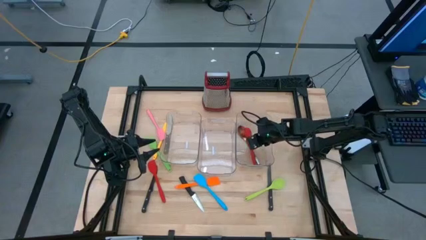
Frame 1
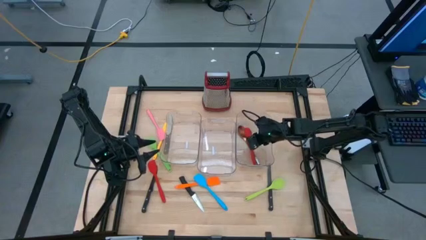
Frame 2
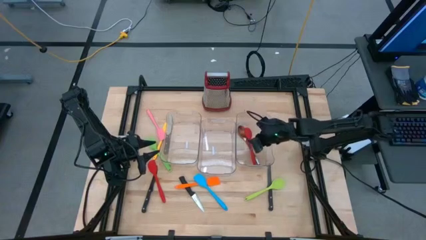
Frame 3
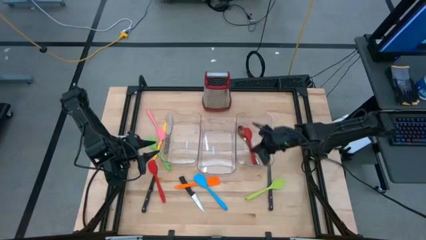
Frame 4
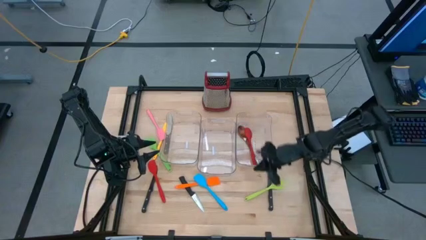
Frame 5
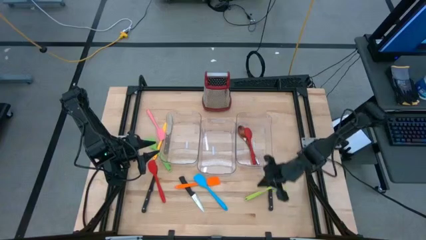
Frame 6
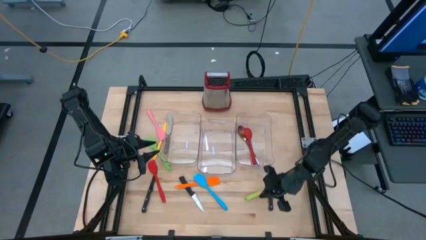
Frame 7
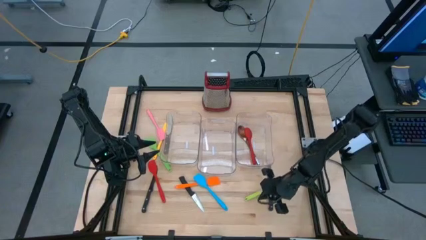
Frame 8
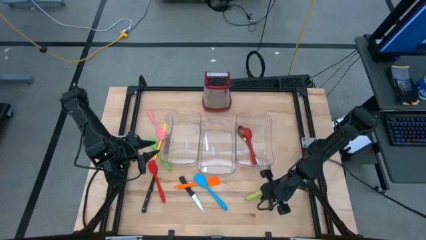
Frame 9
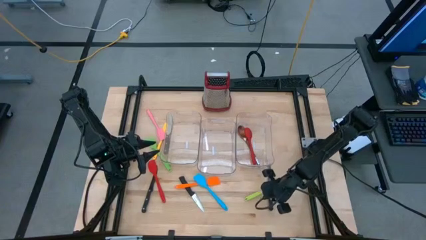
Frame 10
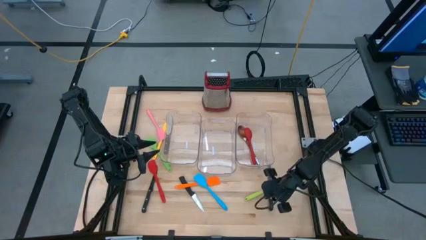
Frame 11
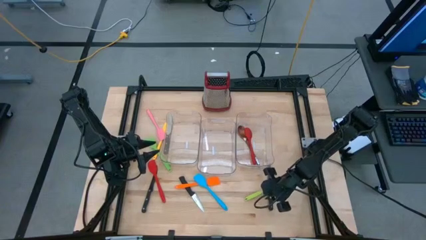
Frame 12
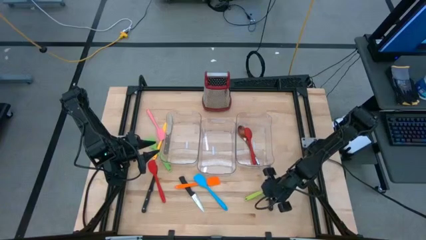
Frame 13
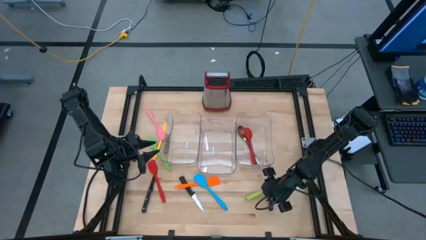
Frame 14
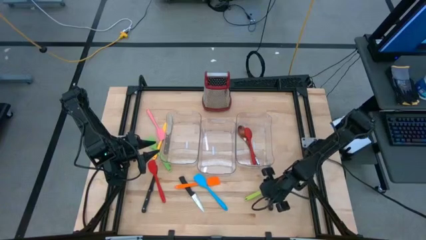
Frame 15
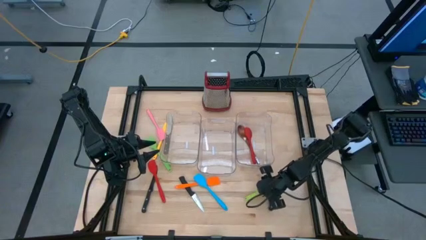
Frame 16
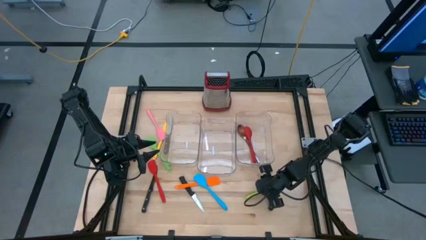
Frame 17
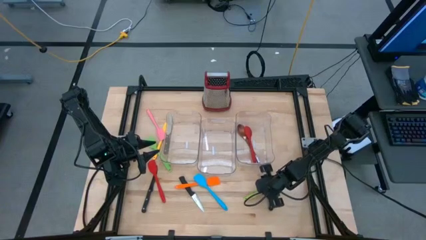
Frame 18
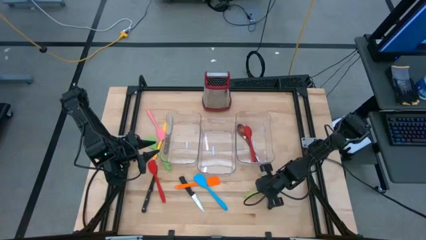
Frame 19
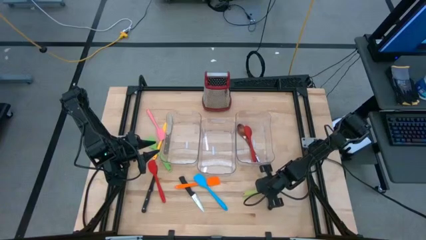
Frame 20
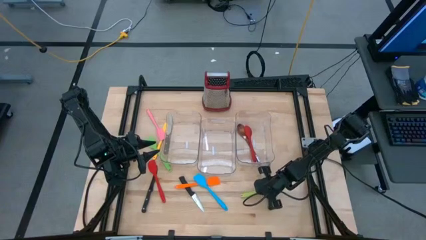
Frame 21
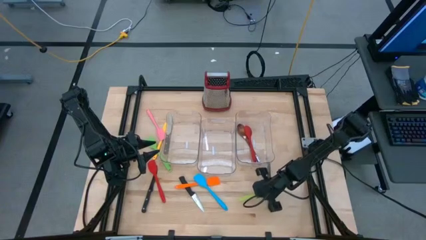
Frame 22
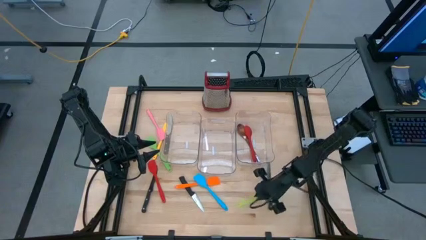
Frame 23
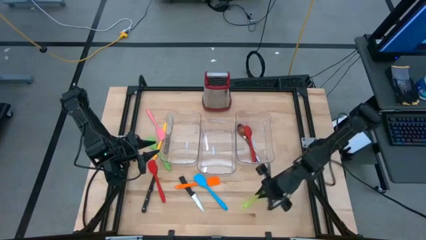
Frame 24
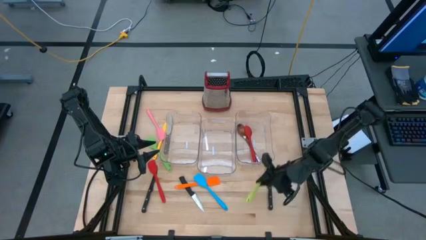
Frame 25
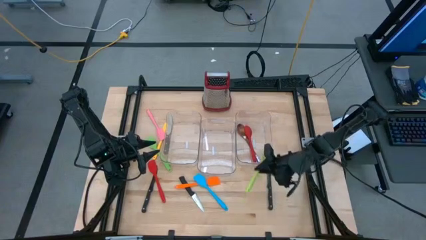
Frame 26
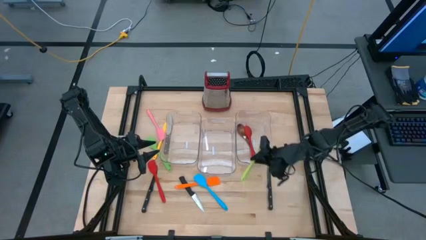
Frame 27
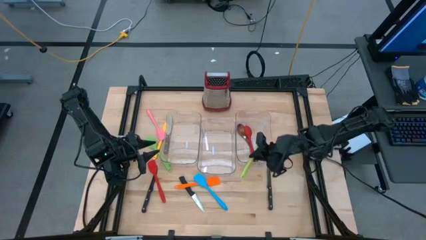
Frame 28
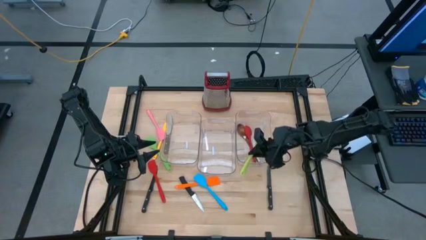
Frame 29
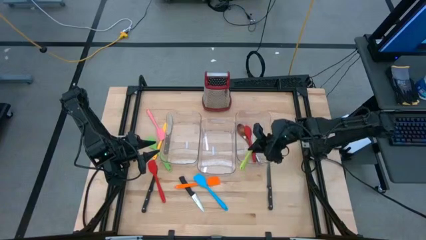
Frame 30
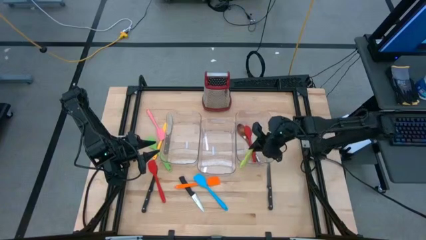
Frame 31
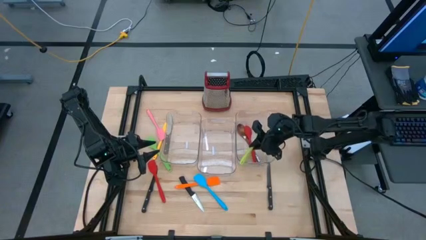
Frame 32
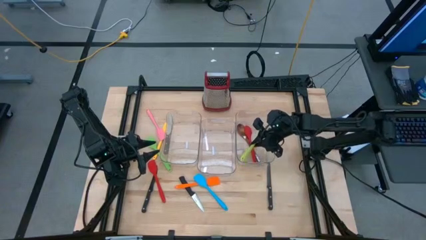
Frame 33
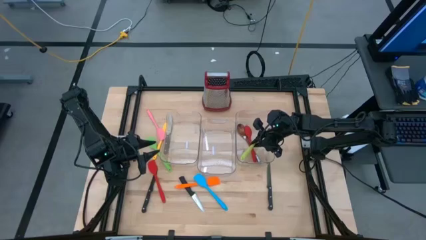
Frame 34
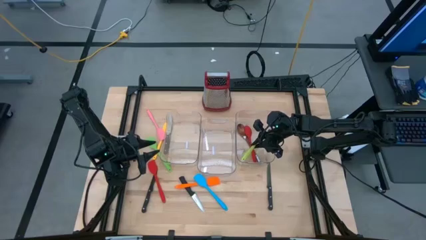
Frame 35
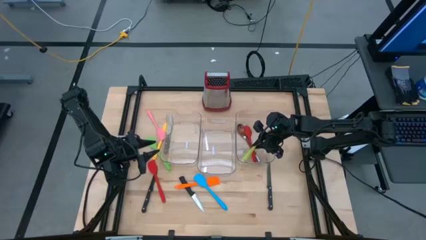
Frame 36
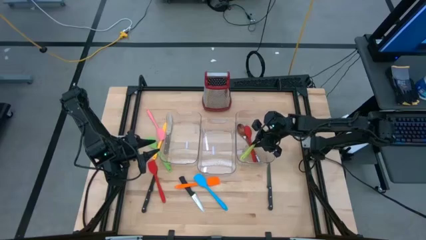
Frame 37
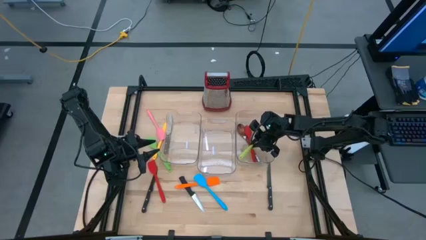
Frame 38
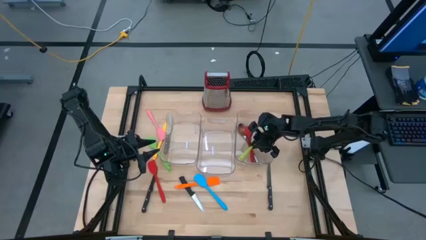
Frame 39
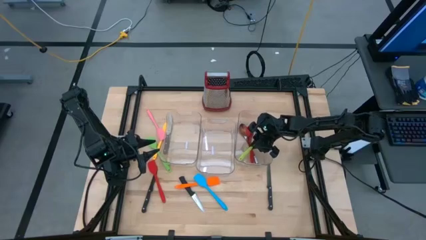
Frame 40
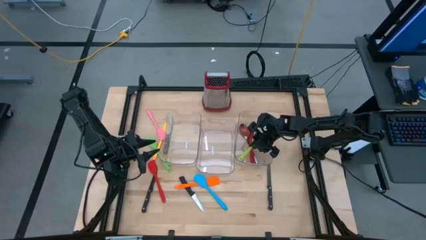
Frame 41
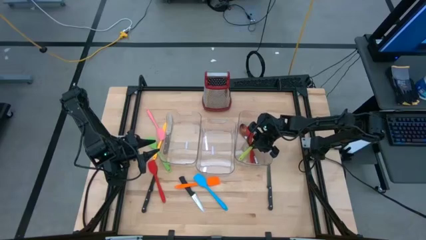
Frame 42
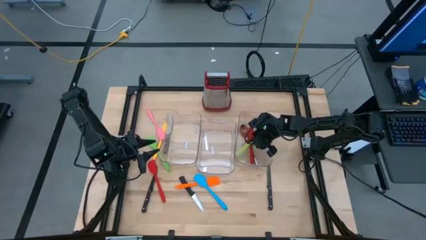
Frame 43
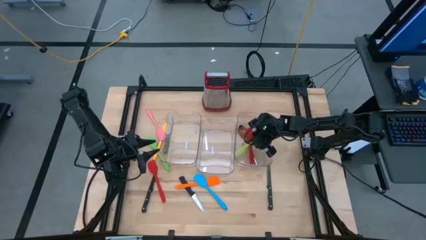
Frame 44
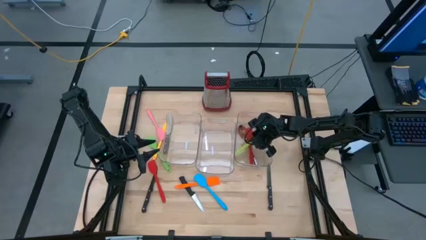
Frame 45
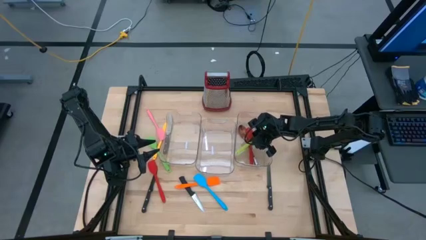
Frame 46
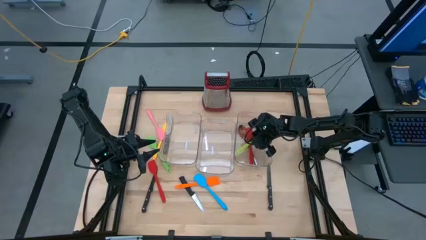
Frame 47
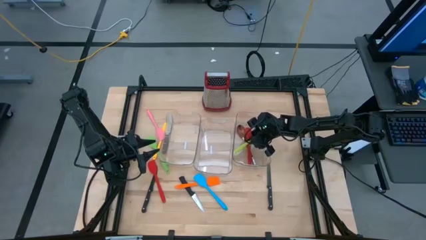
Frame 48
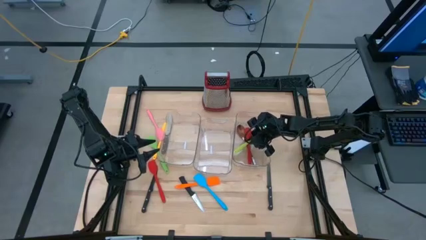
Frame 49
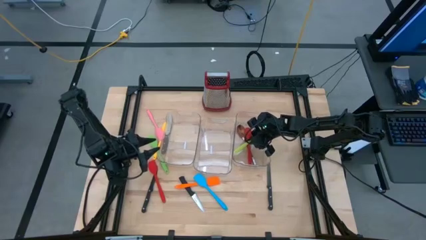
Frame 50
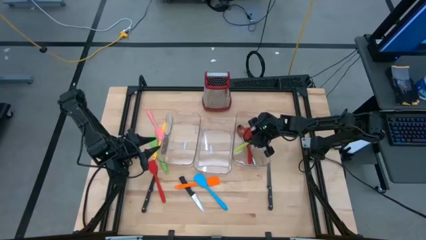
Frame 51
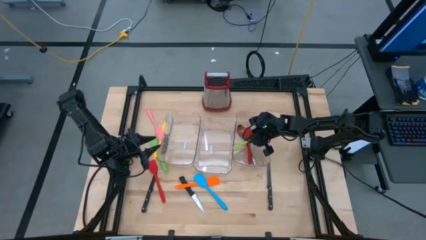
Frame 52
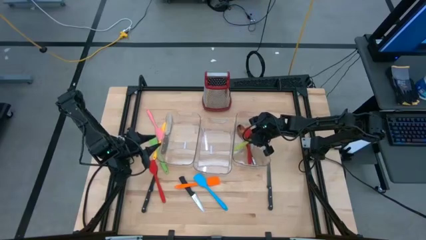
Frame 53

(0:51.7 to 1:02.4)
Task: Pick & Place Kitchen Items
Put the light green serving spoon into the right transparent bin

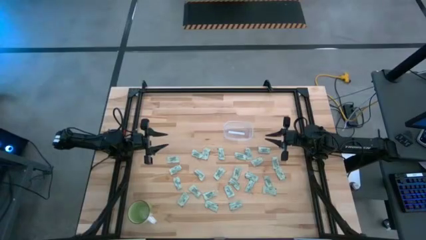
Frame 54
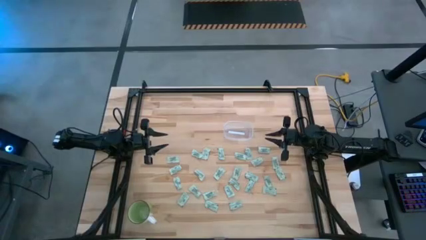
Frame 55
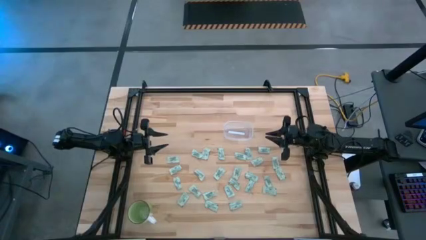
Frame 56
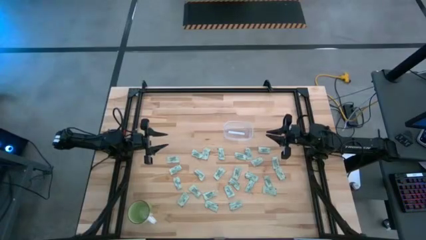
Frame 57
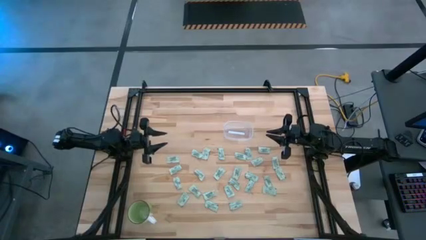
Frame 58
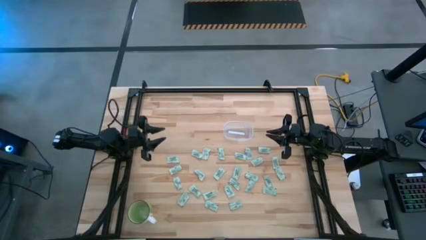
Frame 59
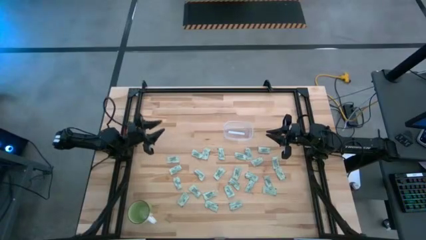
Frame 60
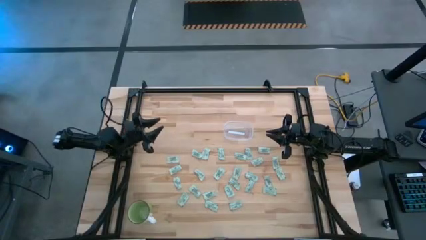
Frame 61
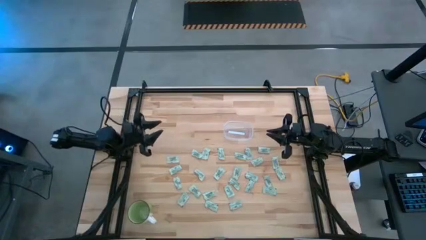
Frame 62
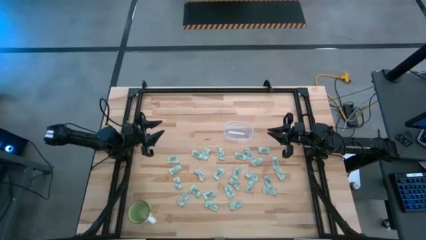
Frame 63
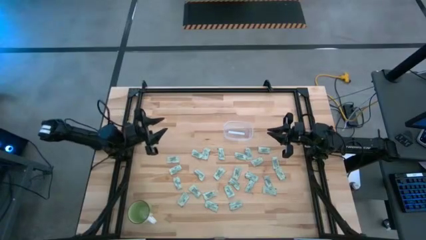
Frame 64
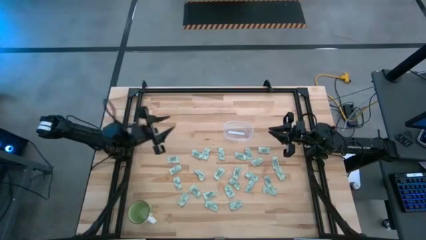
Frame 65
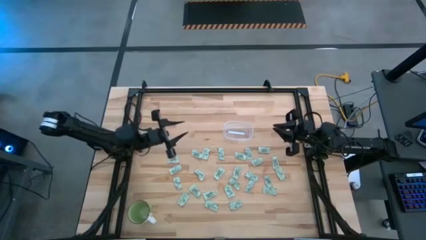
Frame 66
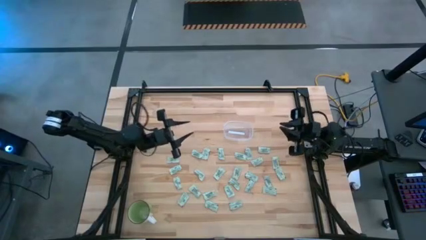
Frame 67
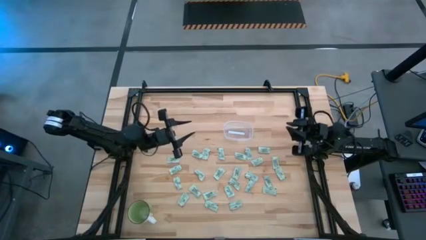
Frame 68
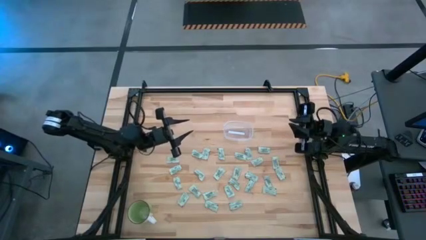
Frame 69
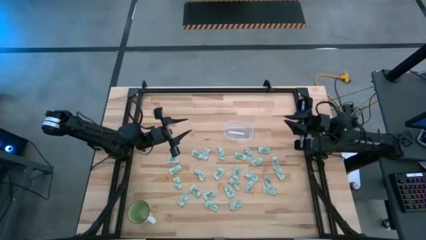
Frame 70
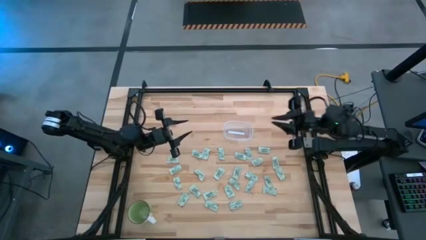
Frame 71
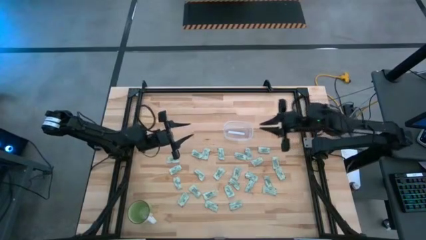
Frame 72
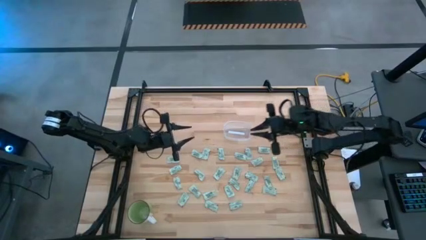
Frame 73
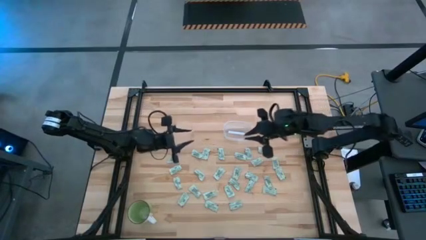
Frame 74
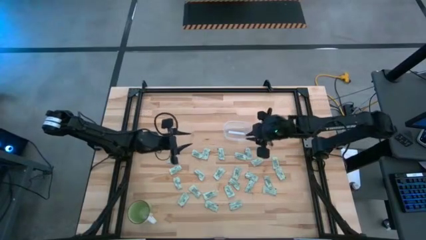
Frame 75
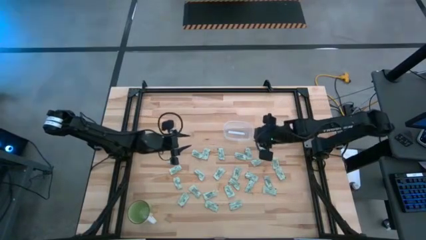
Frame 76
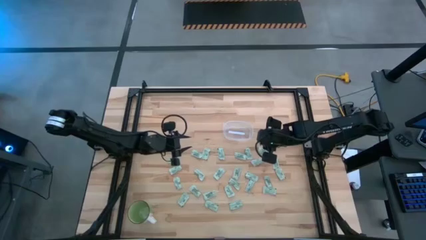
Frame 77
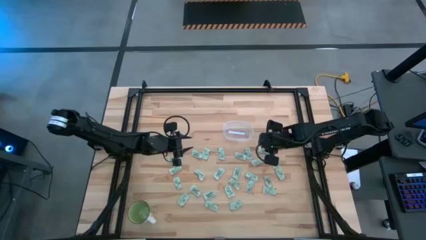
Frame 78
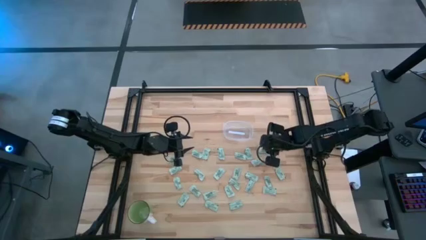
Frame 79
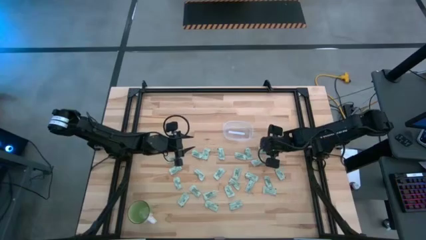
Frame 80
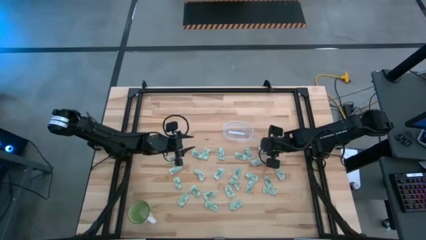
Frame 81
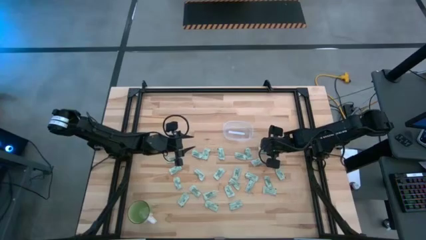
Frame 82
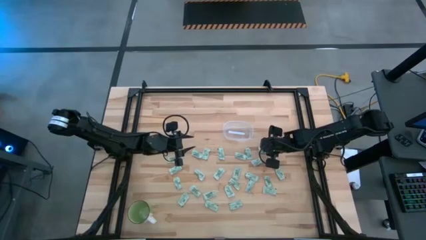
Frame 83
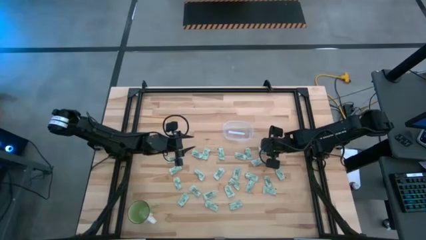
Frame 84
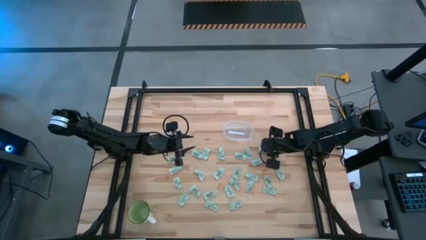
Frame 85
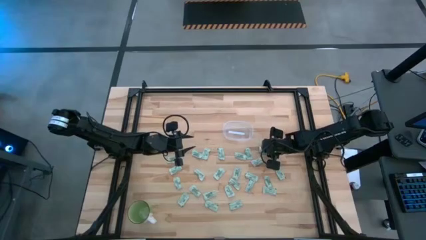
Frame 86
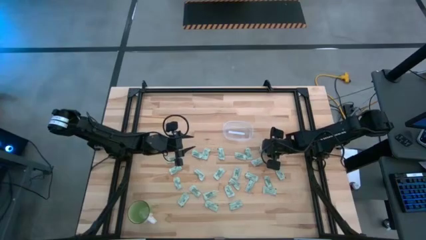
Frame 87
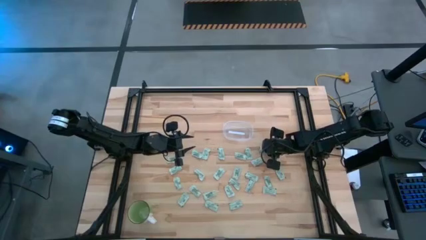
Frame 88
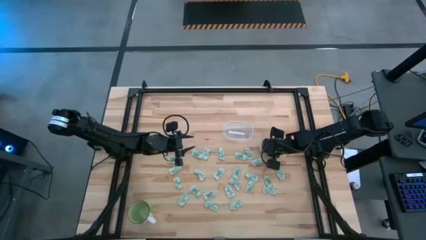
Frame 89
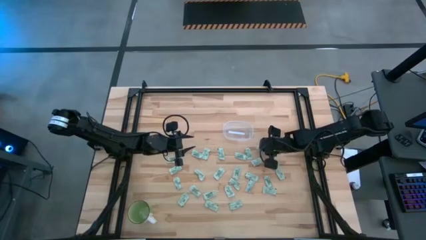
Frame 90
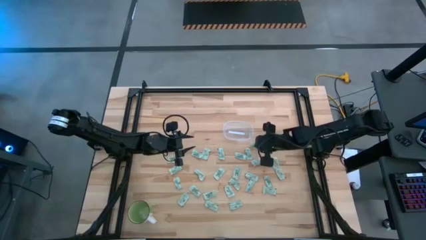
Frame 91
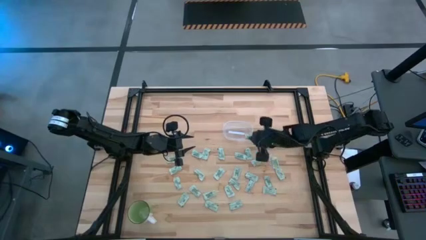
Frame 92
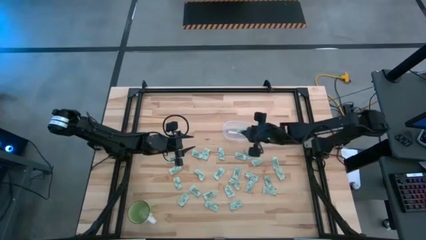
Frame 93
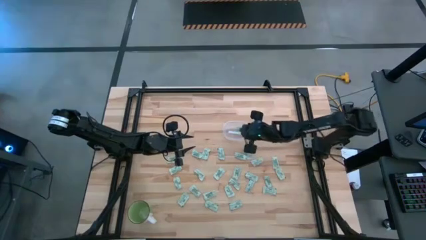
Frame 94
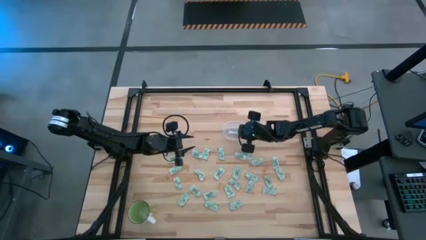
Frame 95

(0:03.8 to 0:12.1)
Task: Pick and place Stevia / Truvia into bins
Put the stevia packet into the transparent bin
